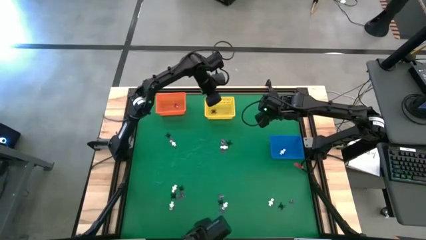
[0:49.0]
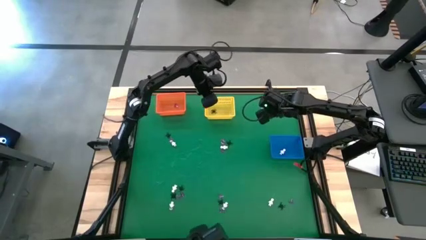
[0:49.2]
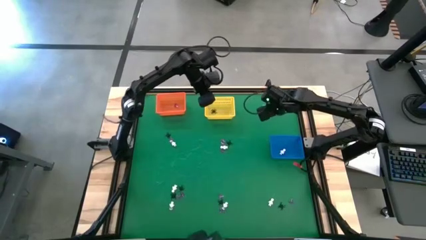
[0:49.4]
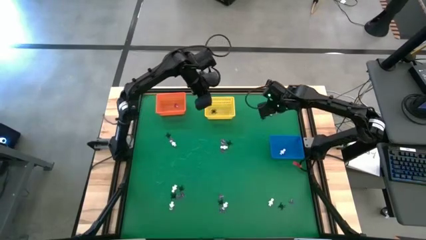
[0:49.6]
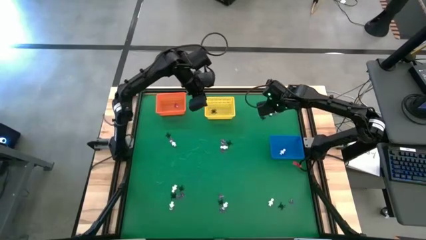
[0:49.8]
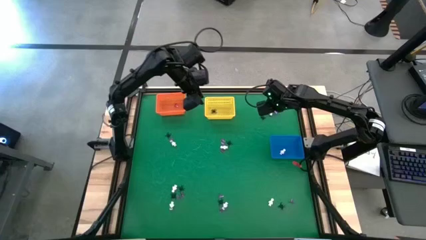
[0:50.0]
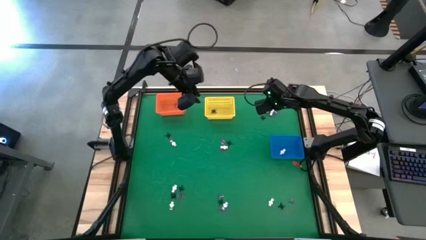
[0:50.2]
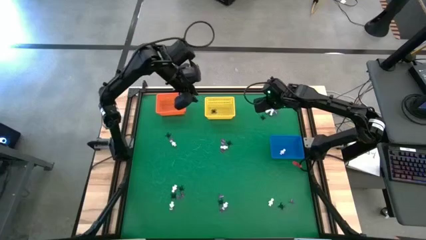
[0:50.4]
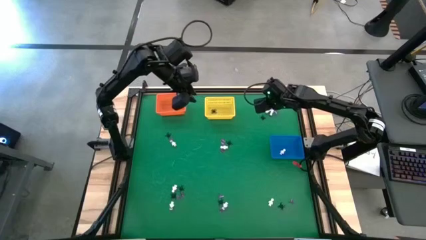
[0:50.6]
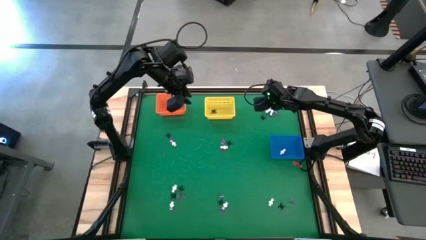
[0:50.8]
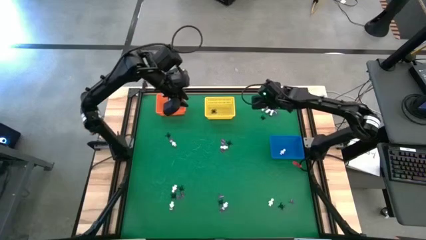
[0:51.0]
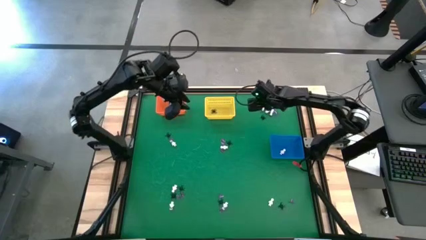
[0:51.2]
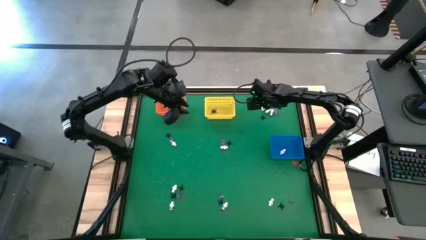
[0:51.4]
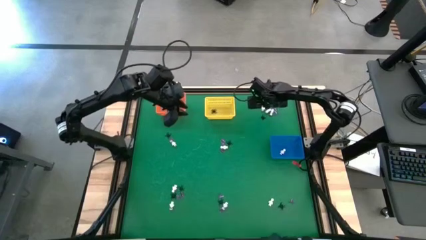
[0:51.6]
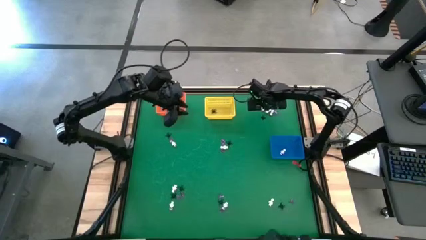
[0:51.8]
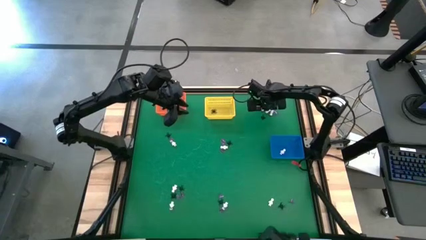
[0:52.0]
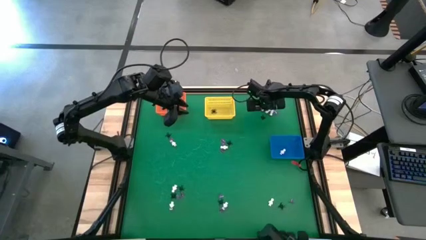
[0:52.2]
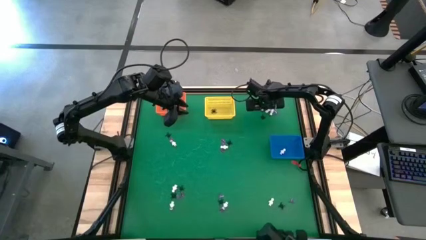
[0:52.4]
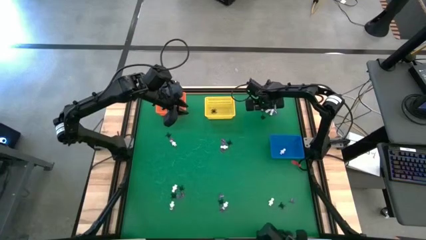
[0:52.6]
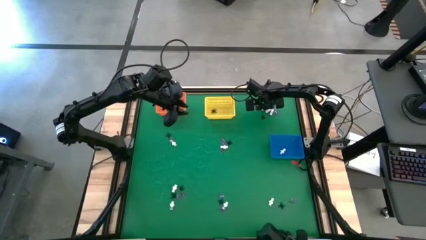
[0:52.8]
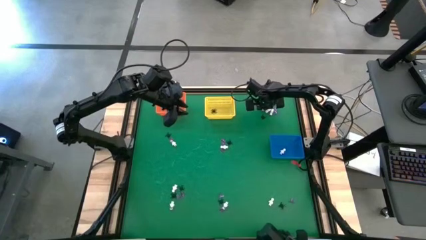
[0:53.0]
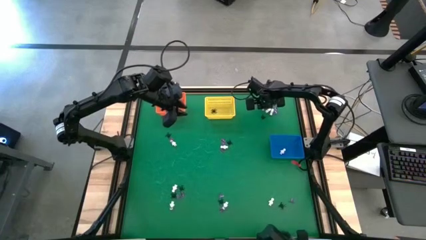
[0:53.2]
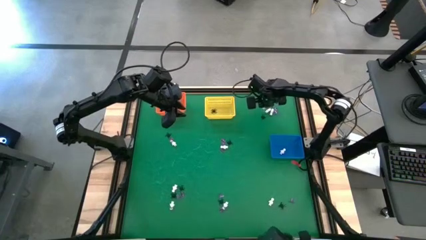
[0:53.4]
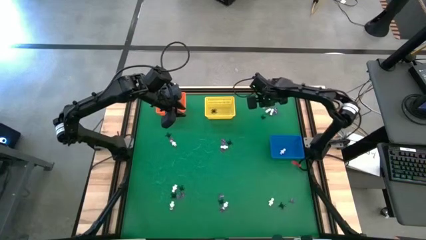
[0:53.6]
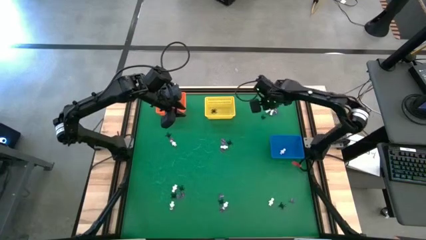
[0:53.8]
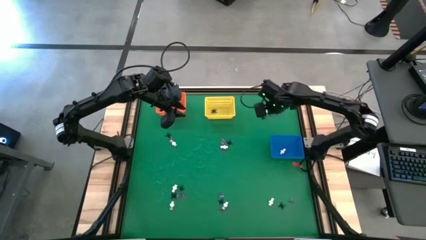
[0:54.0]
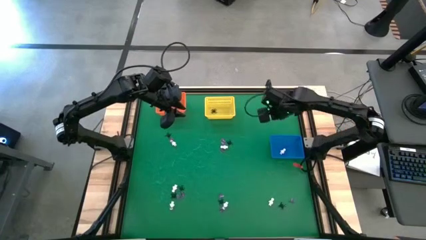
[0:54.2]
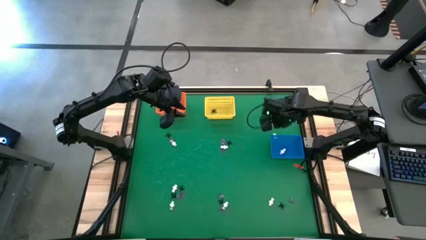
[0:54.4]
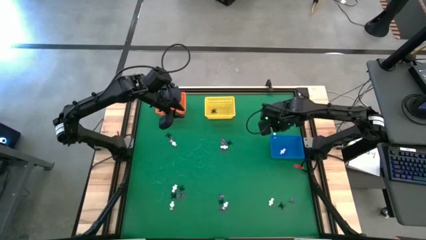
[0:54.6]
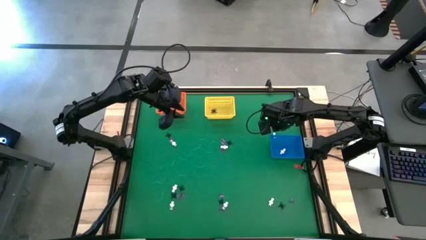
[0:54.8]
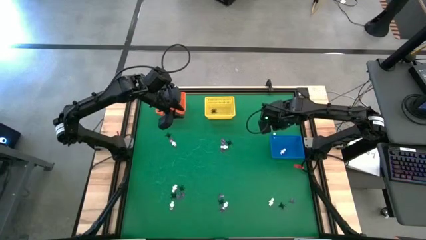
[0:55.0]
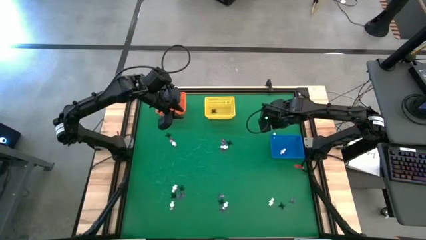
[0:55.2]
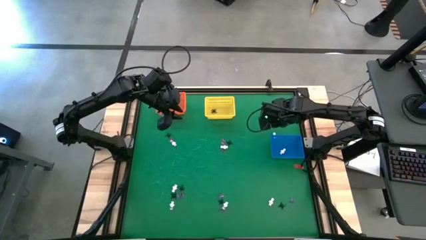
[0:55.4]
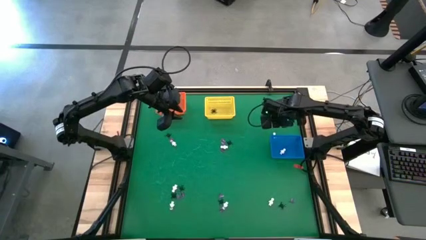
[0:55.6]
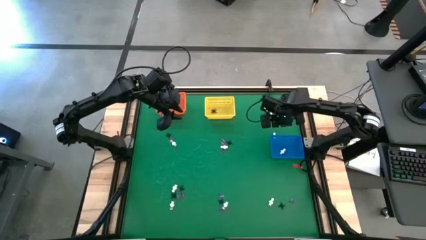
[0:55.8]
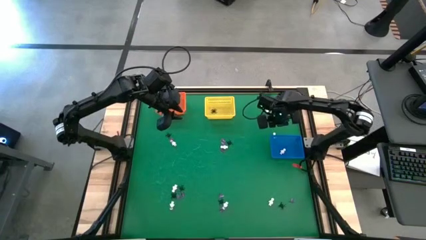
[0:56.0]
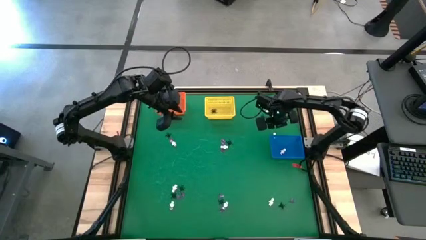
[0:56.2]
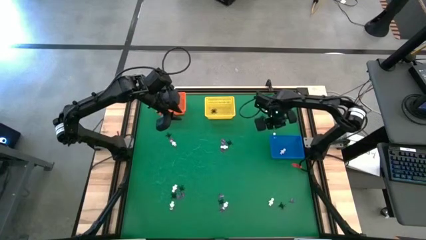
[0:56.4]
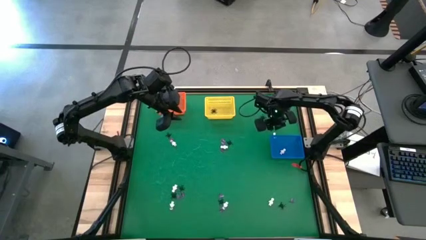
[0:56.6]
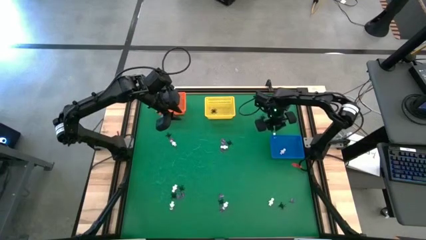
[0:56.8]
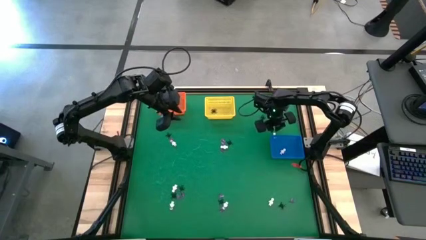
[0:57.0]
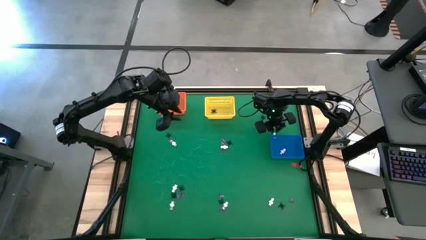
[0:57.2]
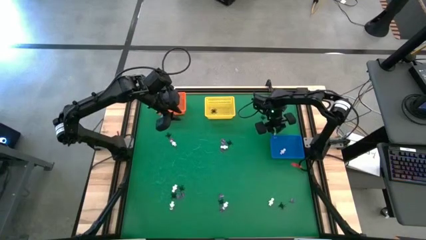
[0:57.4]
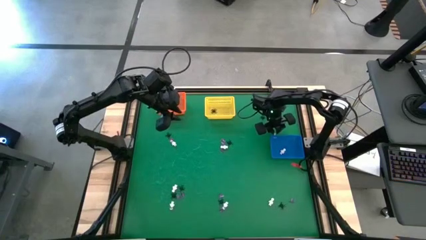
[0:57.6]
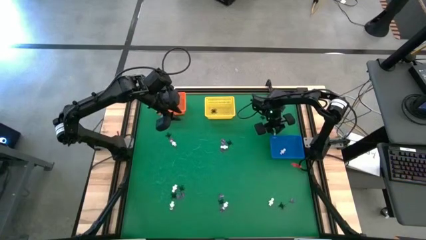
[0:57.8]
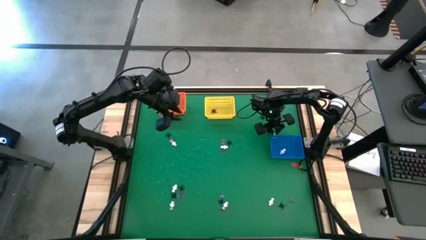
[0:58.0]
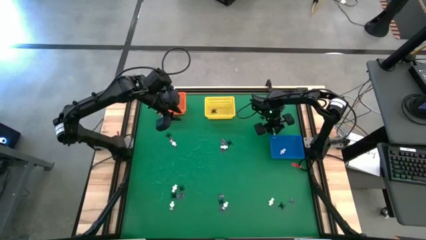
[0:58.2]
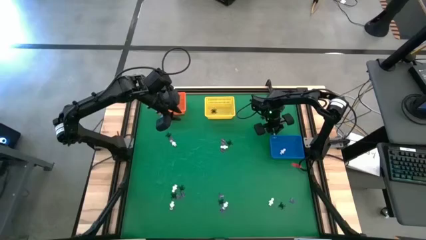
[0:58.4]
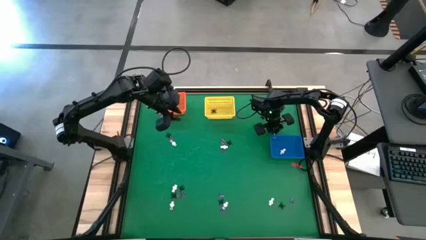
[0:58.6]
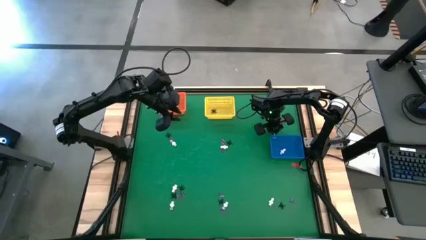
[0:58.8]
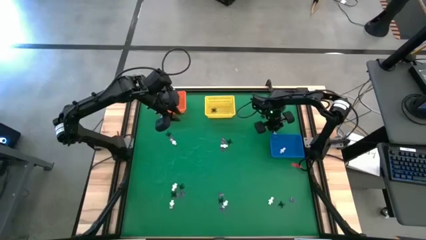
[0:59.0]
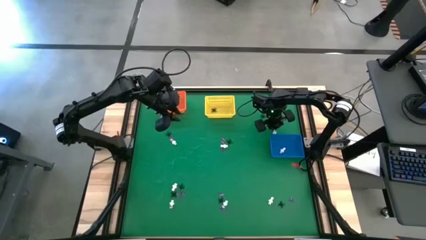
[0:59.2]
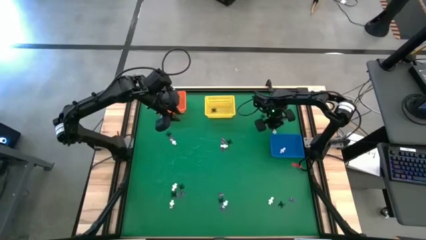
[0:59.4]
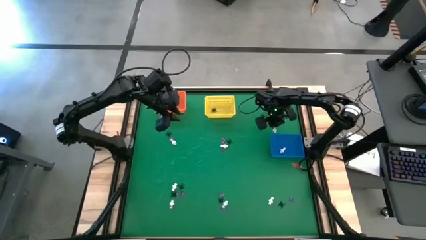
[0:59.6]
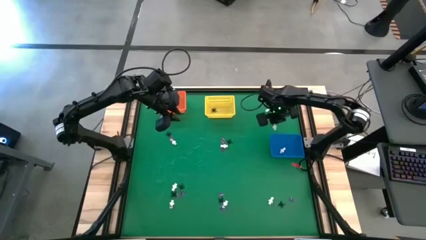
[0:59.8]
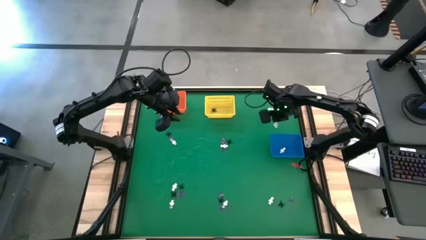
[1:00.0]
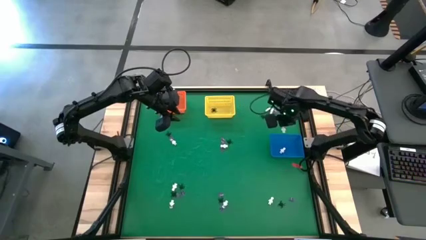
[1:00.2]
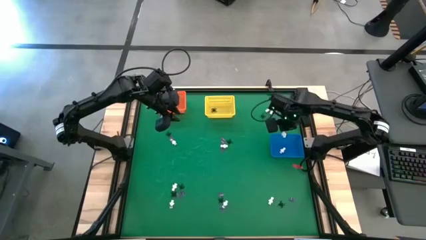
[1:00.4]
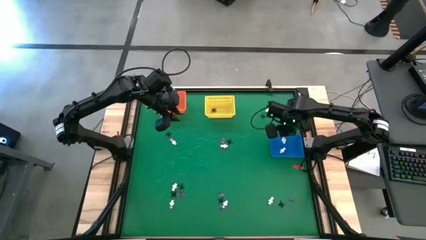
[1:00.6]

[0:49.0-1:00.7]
Task: Sort Halloween decoration
Put the white skeleton toy into the blue basket

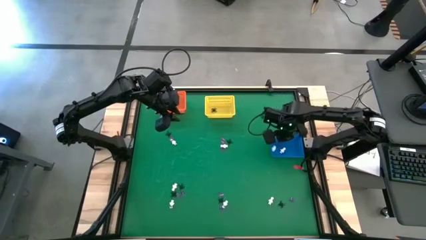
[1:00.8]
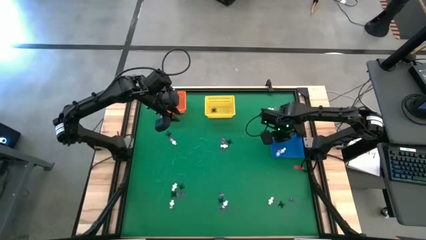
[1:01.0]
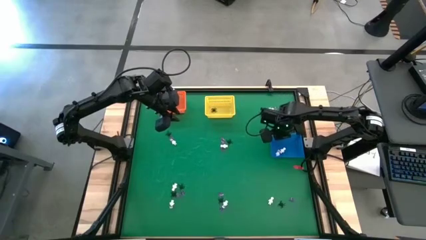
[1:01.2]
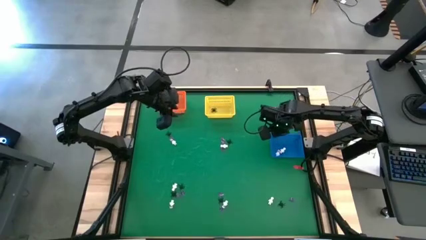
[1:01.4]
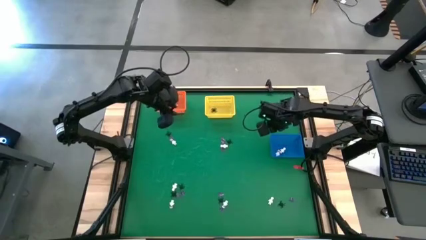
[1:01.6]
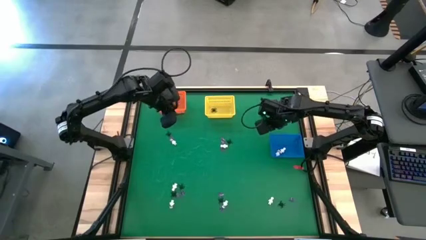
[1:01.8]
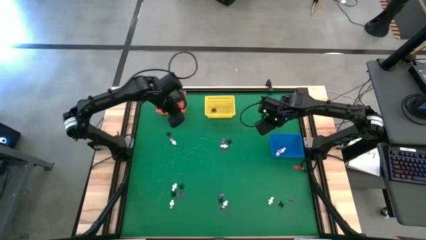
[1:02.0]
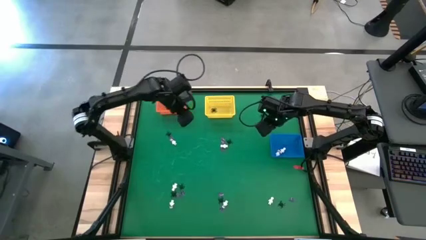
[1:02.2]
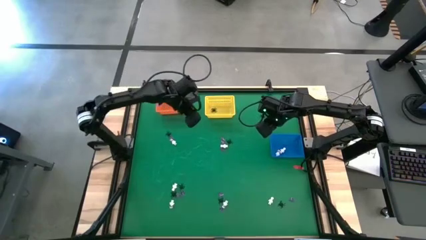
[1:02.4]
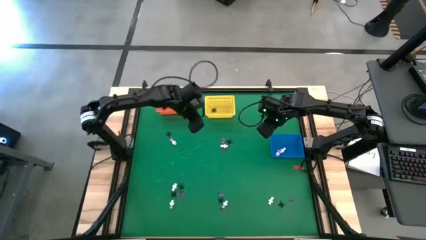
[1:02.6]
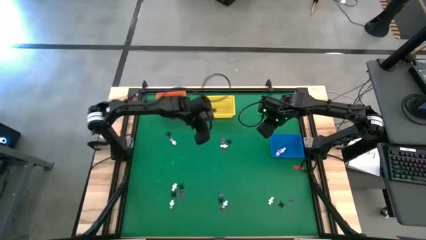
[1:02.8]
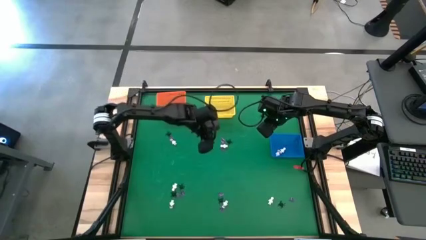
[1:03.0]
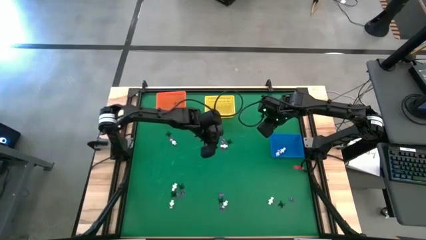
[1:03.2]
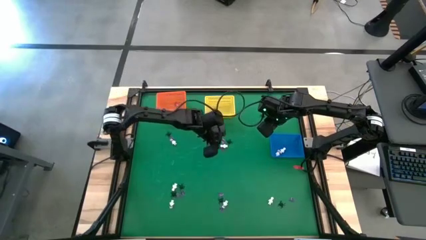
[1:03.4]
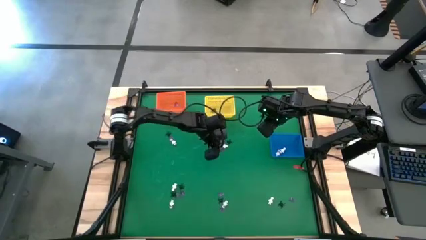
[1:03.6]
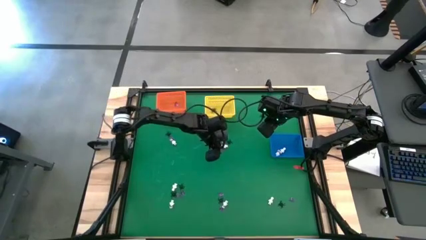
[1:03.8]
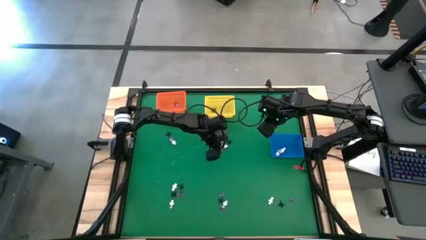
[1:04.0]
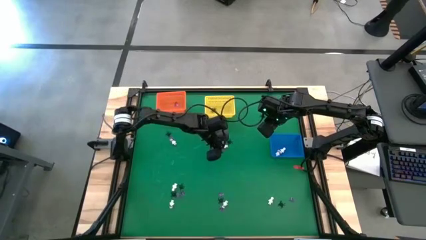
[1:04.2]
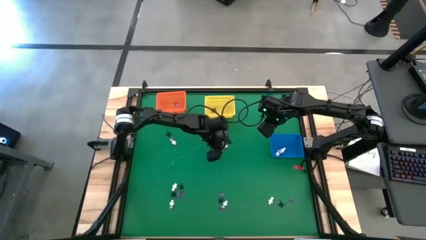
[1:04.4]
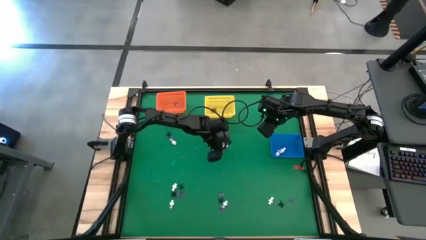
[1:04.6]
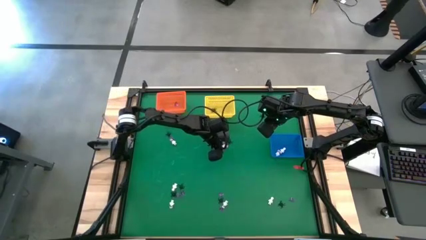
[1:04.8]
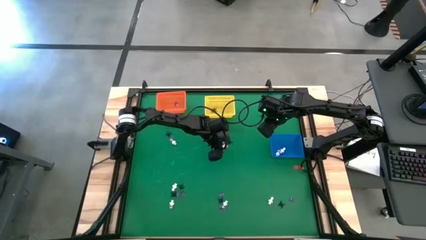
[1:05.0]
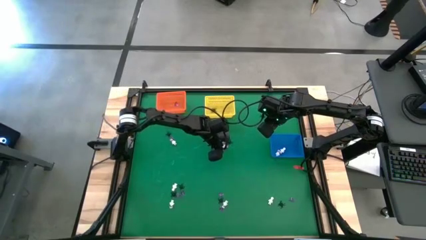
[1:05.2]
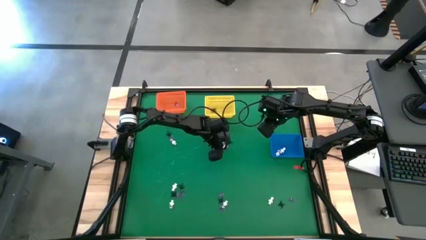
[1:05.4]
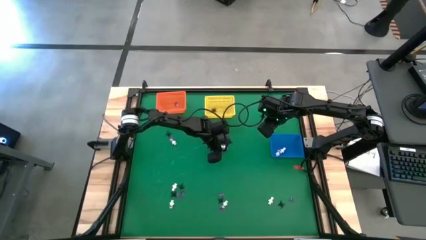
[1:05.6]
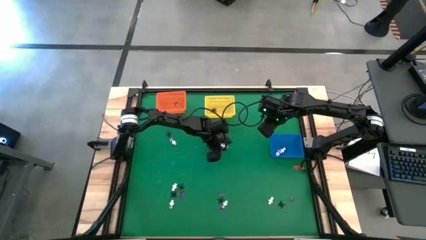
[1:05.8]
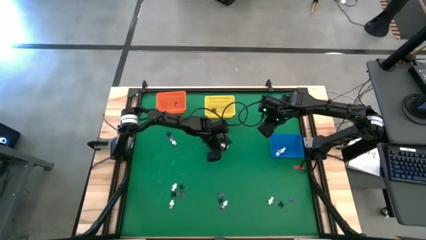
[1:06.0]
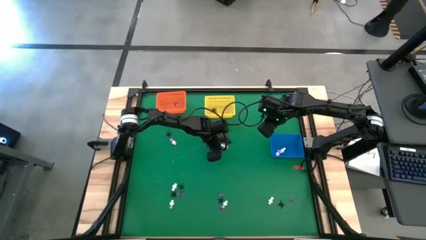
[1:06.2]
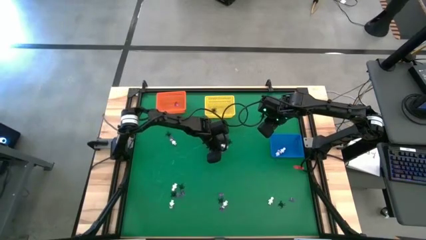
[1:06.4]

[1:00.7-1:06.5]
Put the violet hat toy into the orange basket
